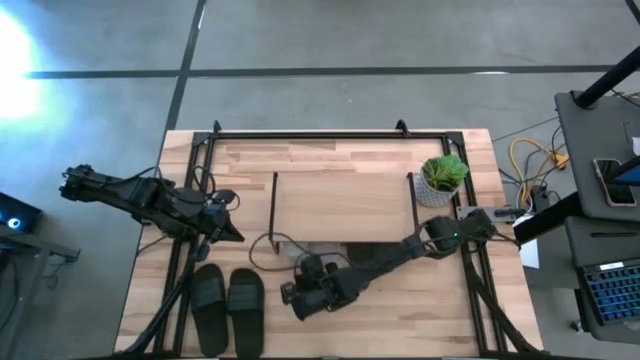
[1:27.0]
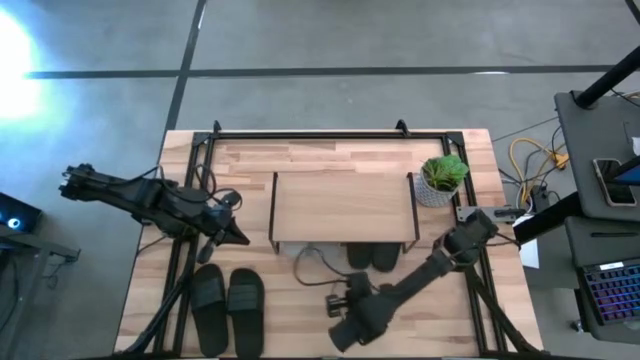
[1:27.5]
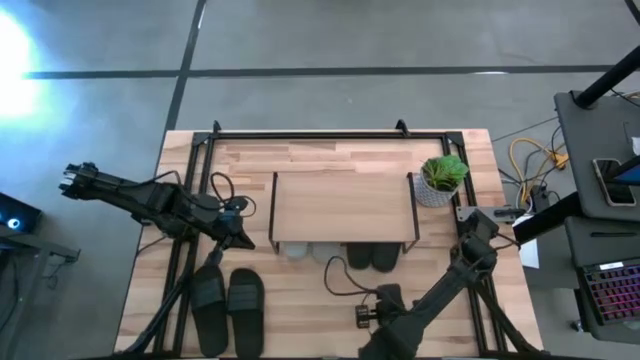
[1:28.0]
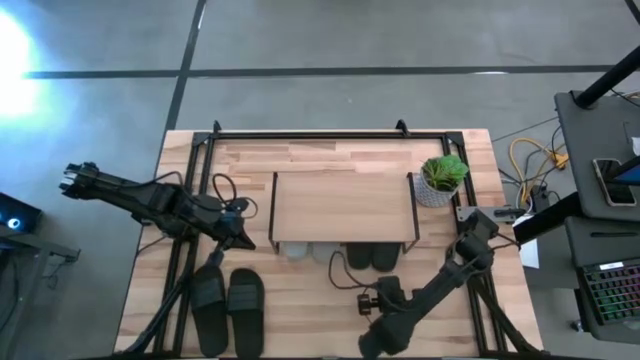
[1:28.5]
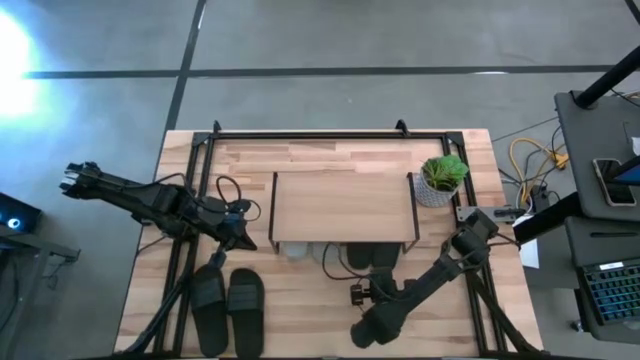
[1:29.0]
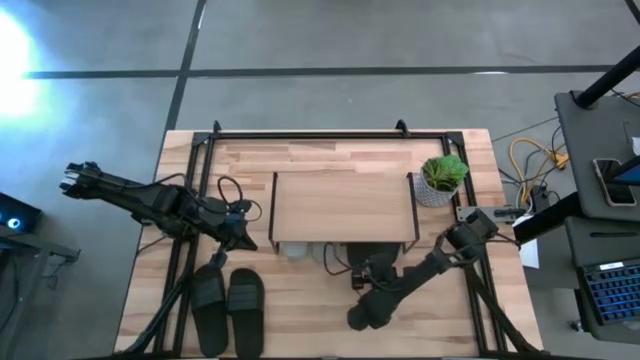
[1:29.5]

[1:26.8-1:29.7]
Task: Pick and place slides into the shelf
Adjust the black slide under the shelf

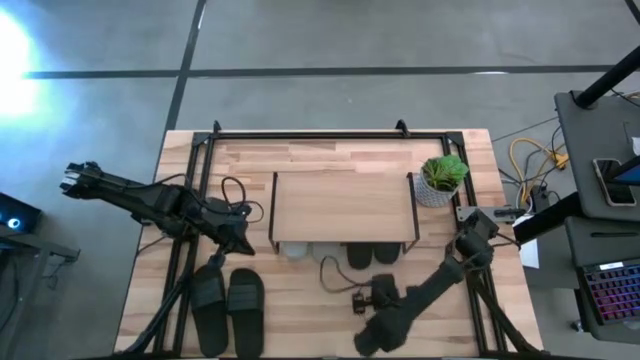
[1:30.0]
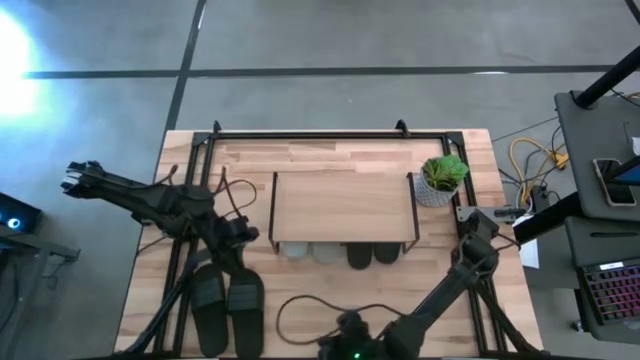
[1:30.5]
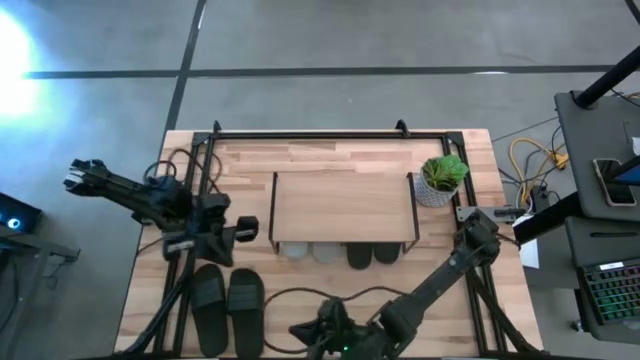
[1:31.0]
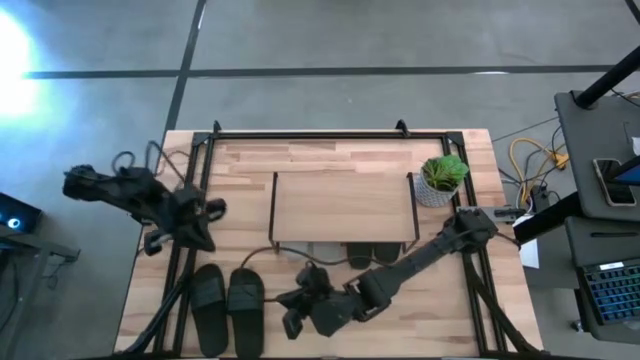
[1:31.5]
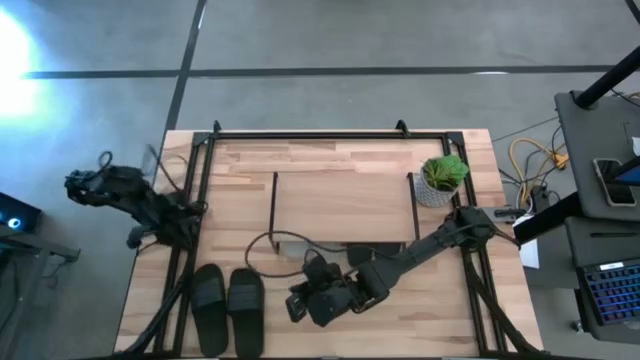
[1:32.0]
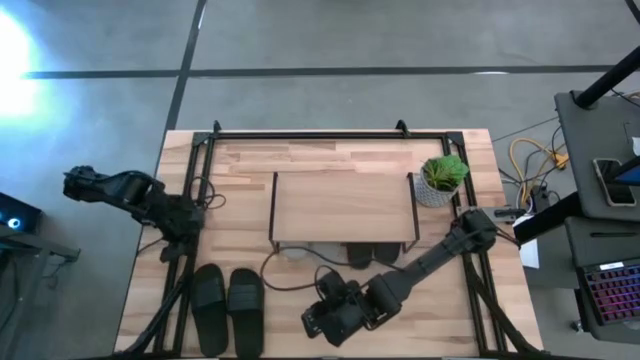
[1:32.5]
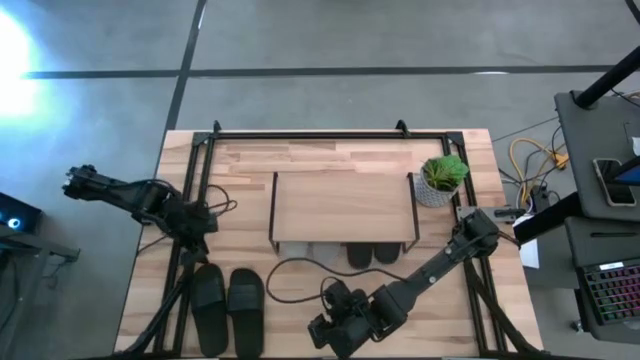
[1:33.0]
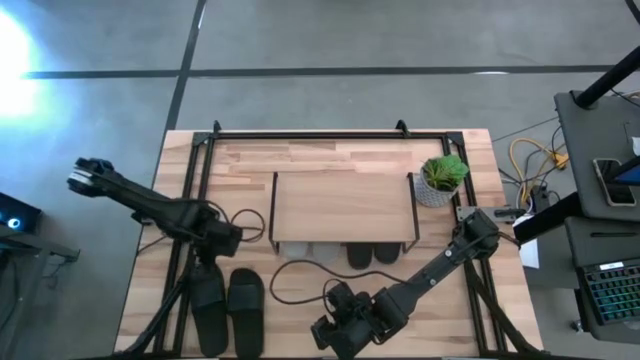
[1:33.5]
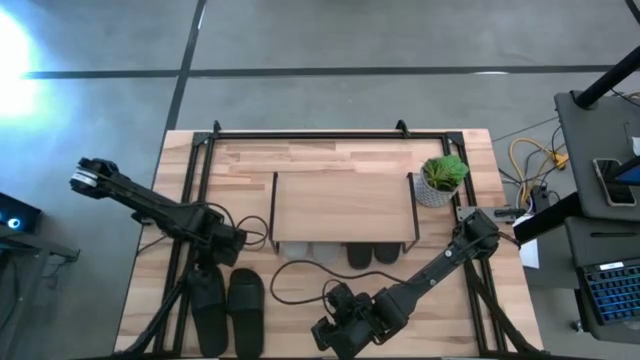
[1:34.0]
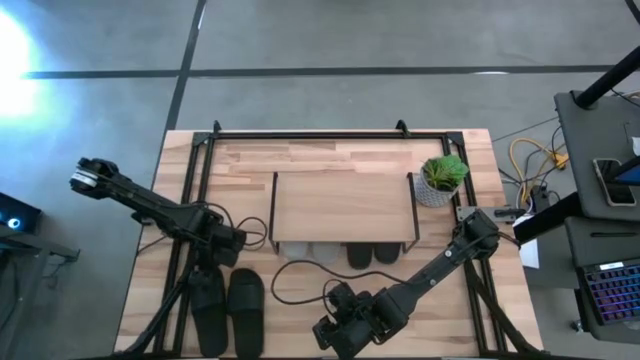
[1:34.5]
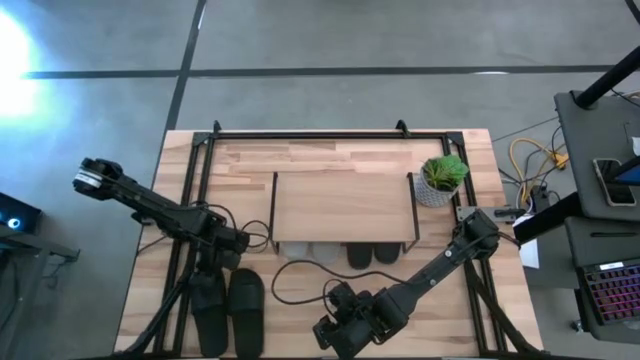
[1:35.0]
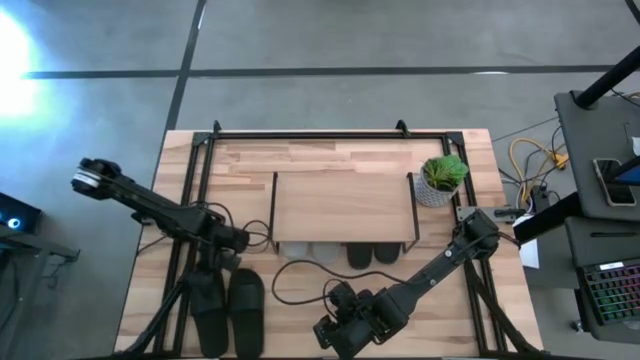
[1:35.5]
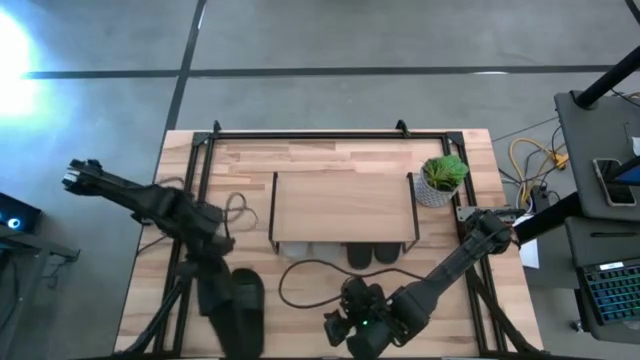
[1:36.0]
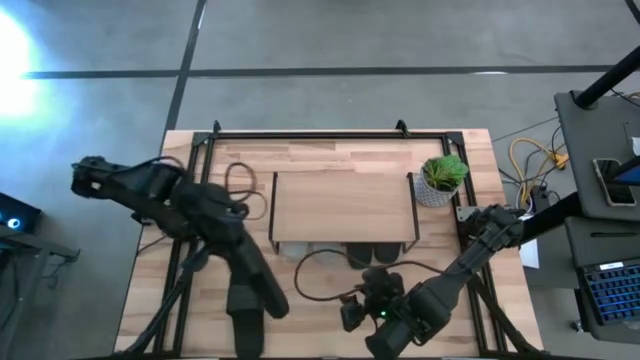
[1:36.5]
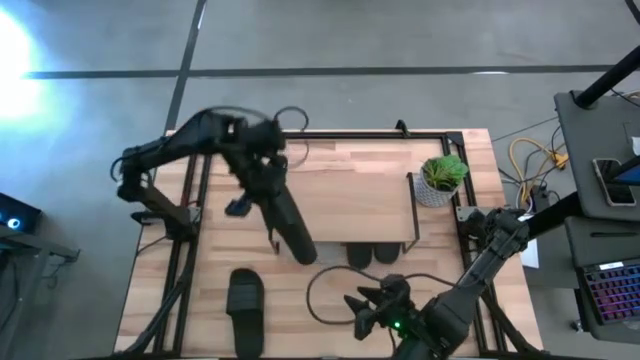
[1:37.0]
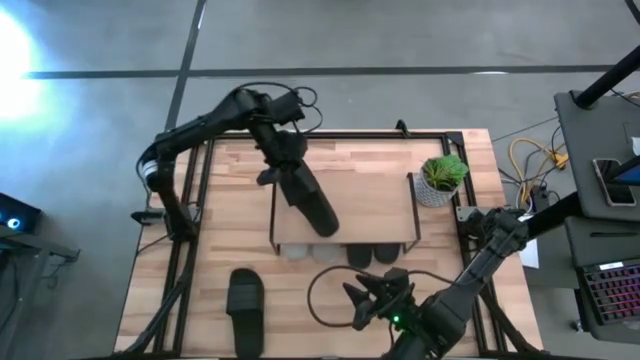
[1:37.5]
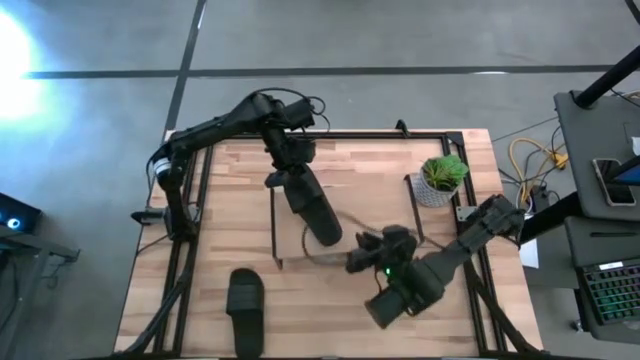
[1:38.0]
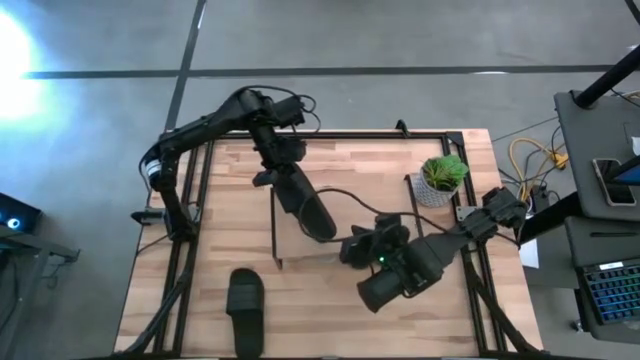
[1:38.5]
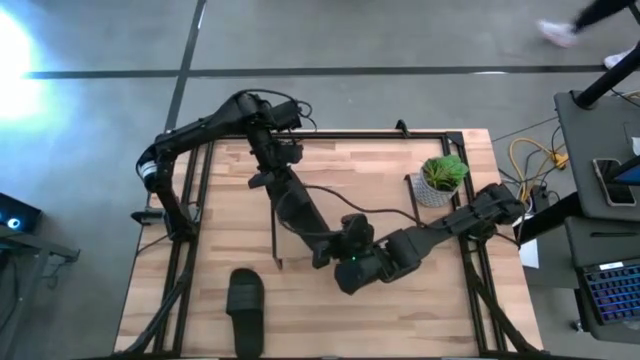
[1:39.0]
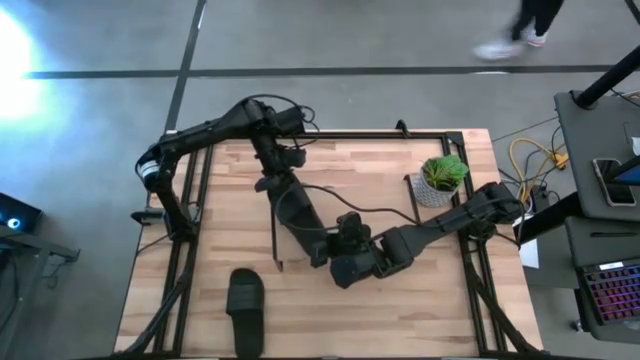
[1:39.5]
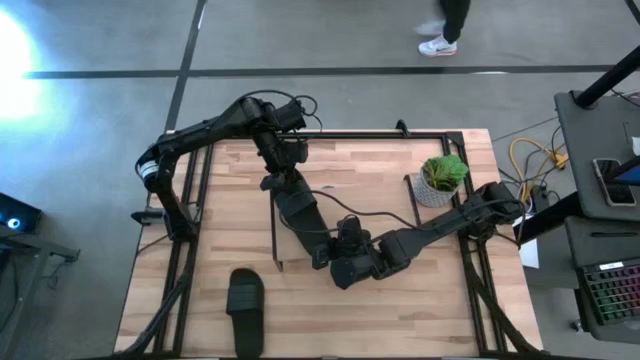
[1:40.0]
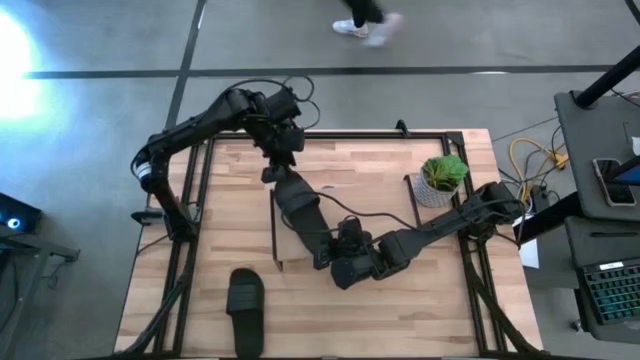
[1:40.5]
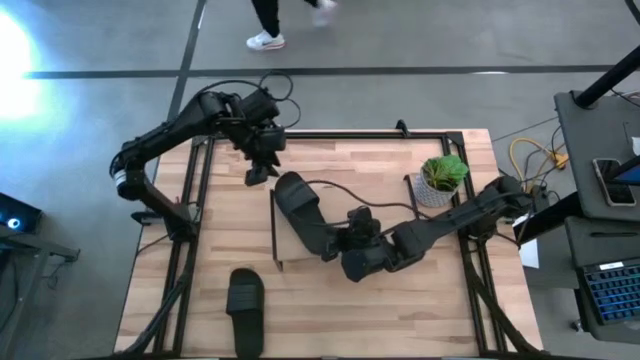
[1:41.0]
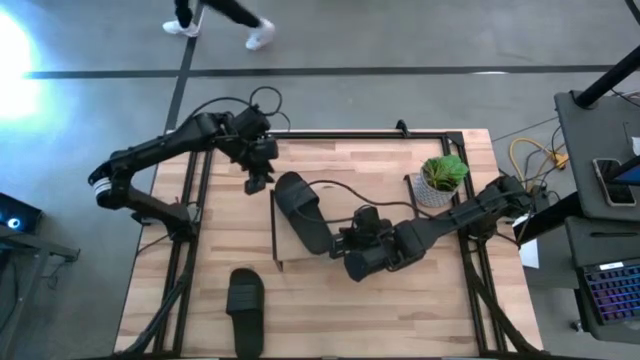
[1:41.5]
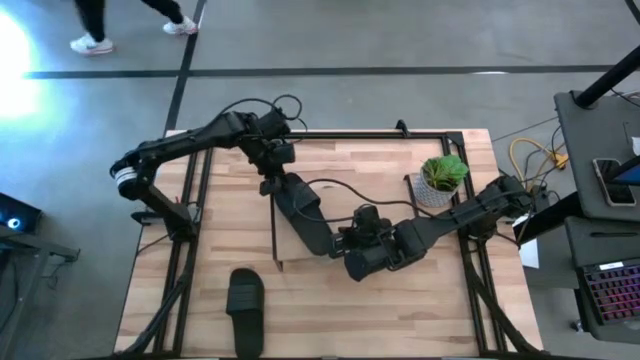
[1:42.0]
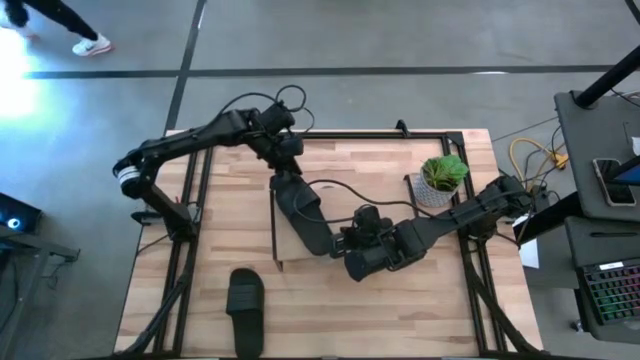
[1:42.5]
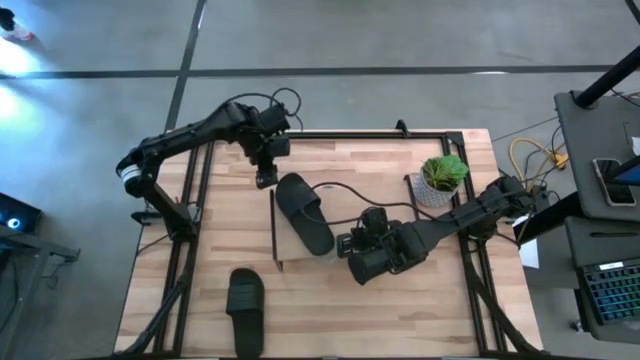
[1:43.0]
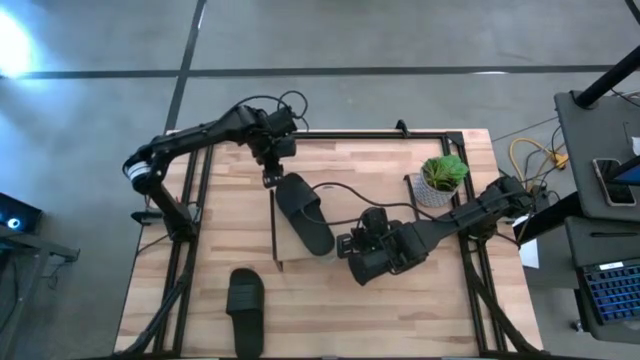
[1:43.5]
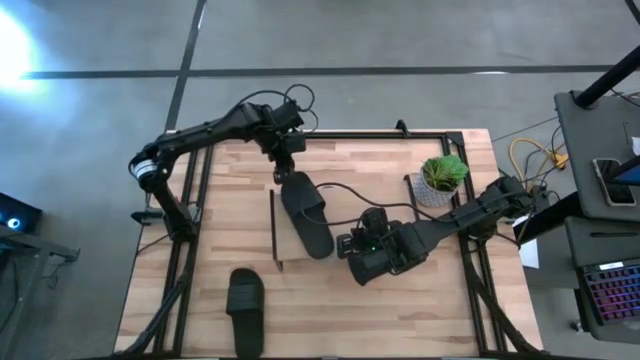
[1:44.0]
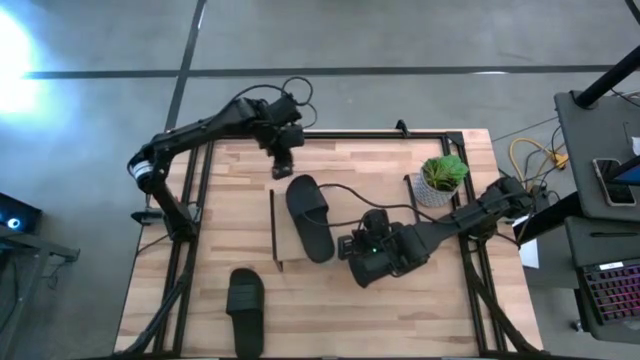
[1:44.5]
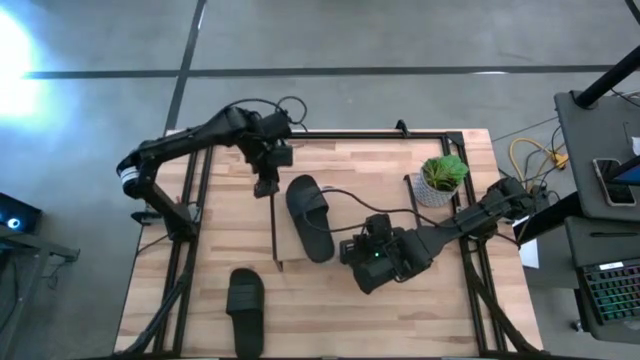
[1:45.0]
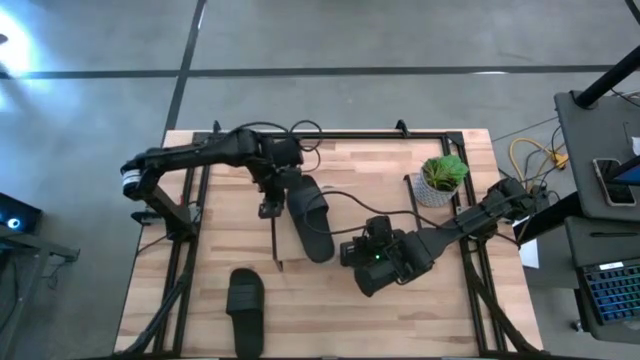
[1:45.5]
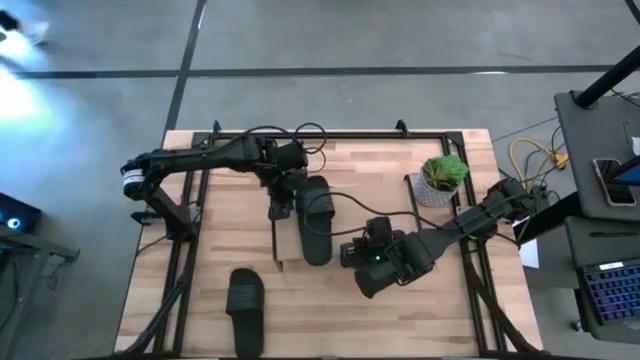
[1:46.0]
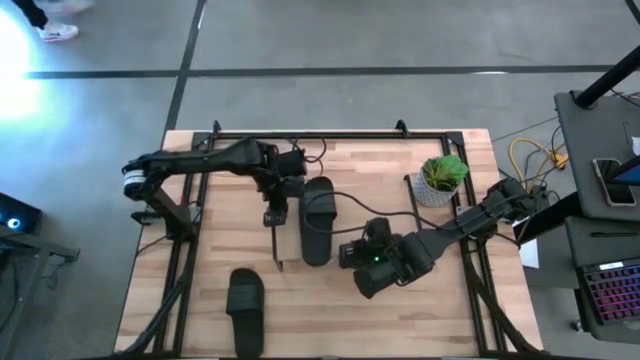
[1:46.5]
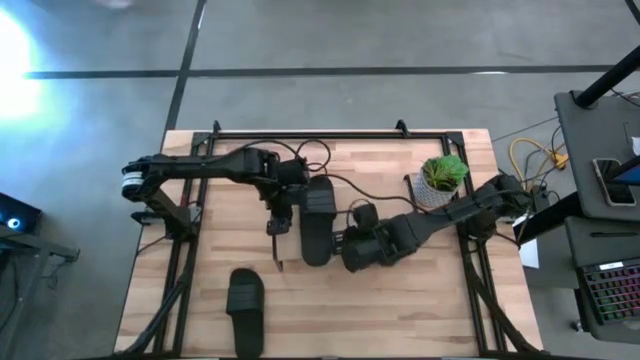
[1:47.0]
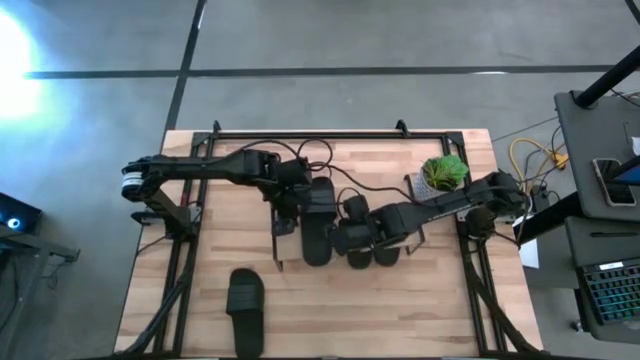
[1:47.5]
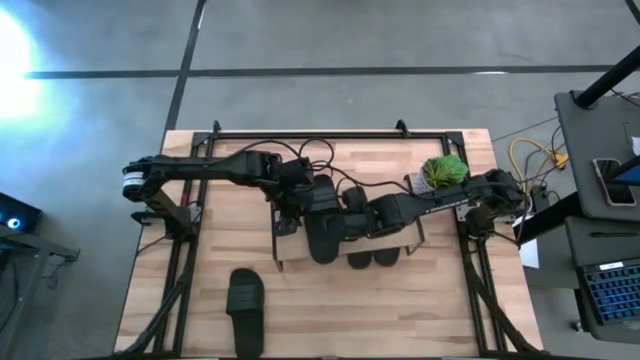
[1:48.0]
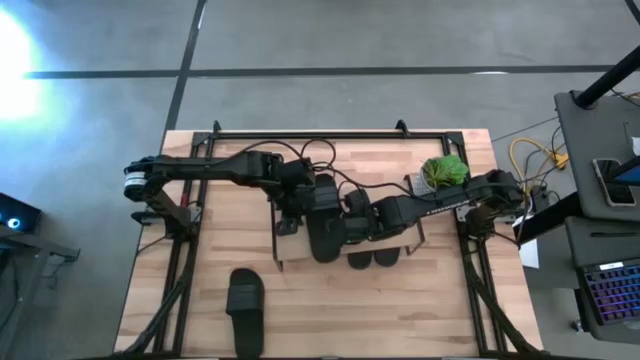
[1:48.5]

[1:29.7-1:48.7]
Put the left black slide on the shelf

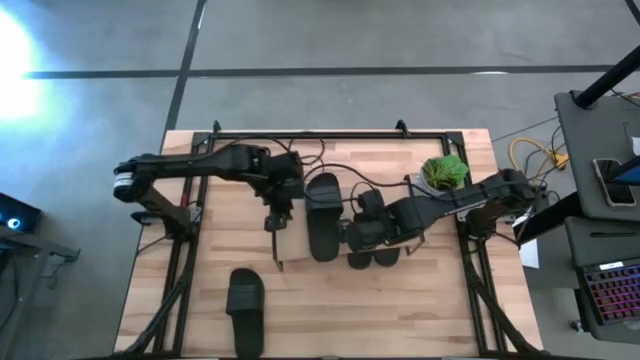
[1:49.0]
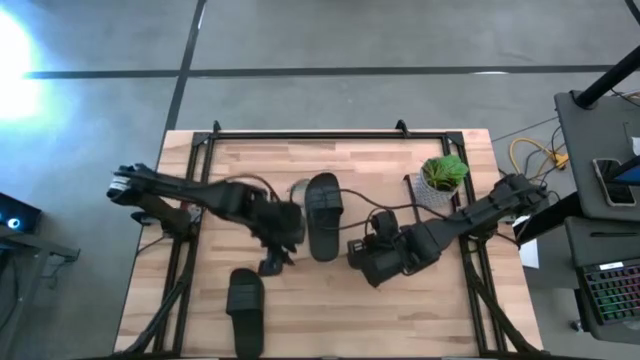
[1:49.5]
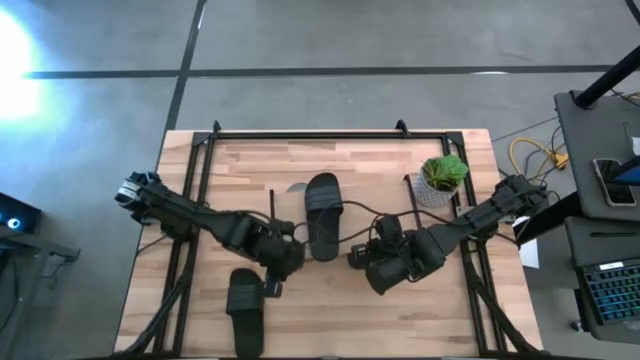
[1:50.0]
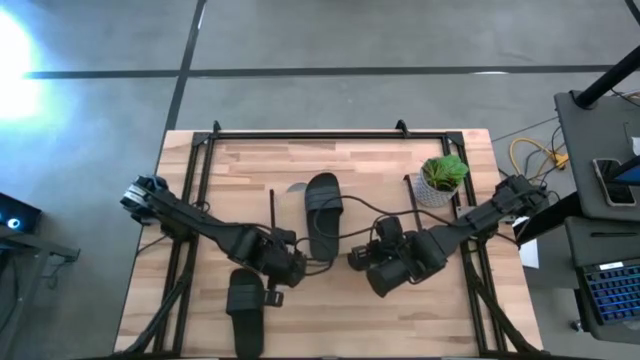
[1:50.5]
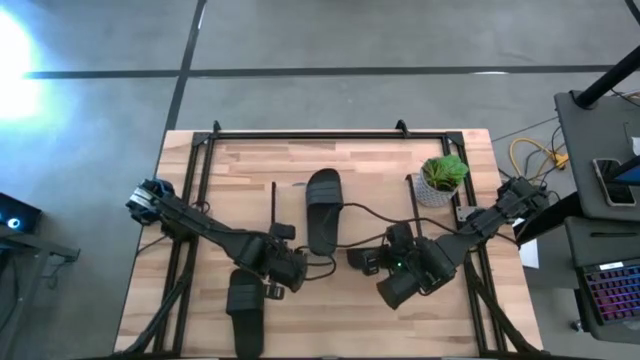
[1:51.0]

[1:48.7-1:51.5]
Adjust the shelf on the table
